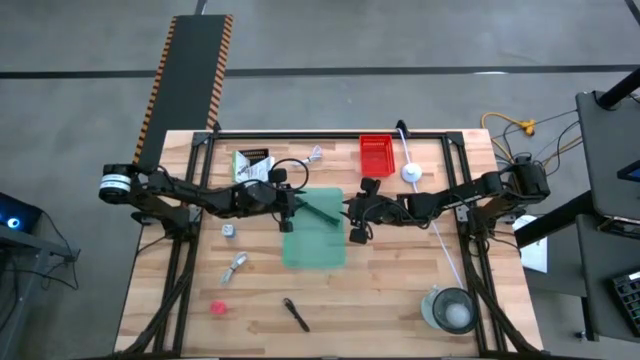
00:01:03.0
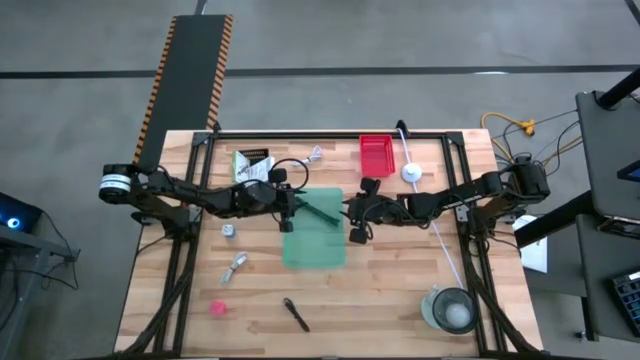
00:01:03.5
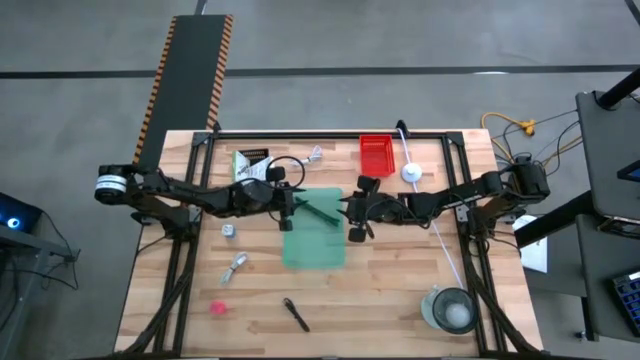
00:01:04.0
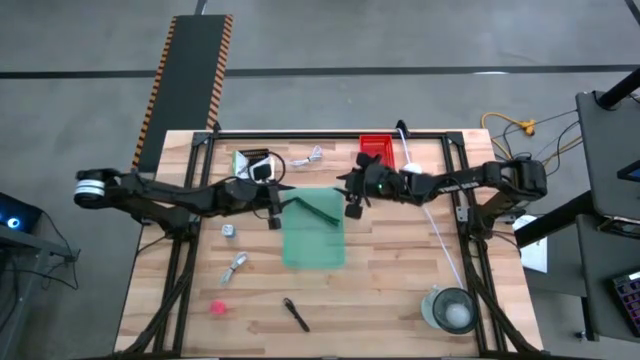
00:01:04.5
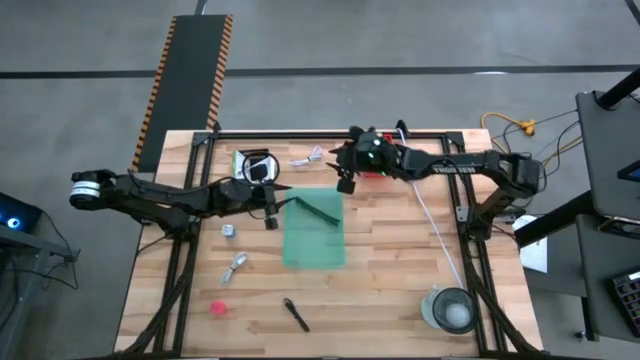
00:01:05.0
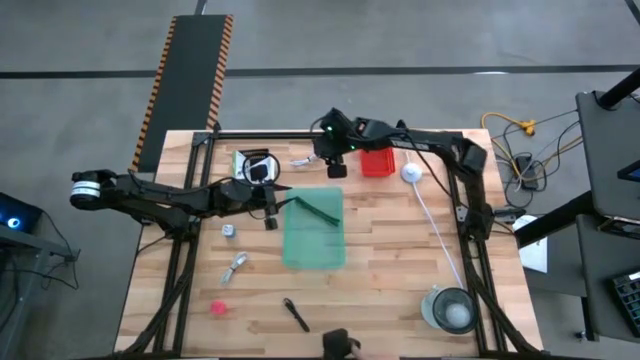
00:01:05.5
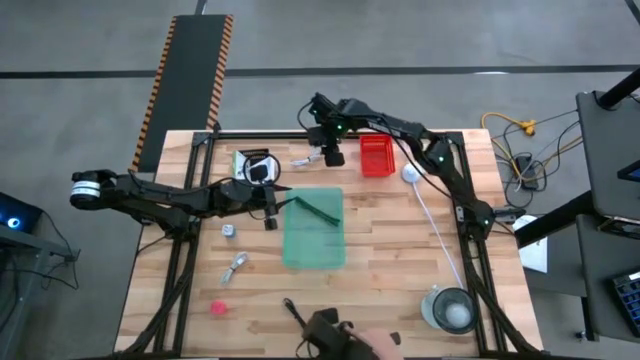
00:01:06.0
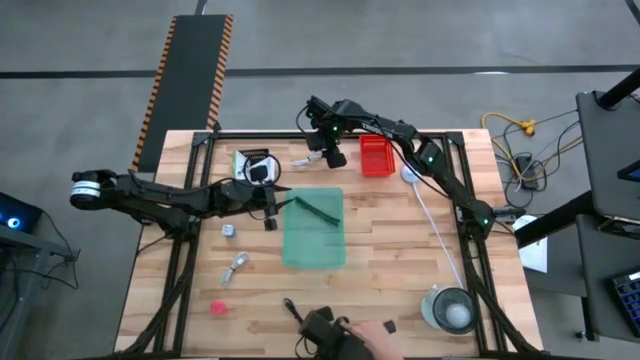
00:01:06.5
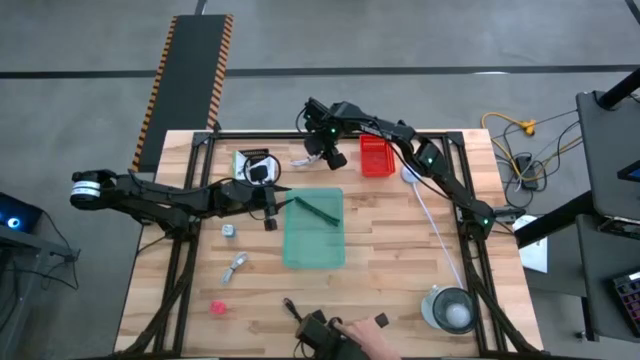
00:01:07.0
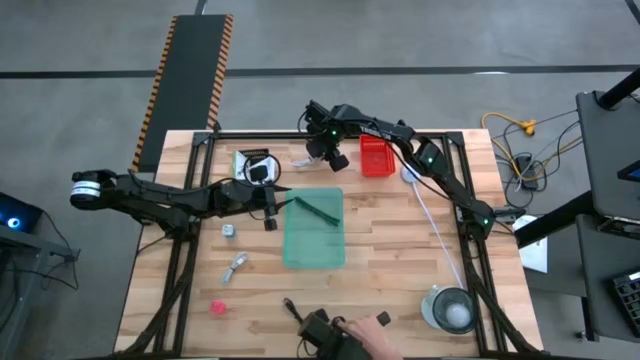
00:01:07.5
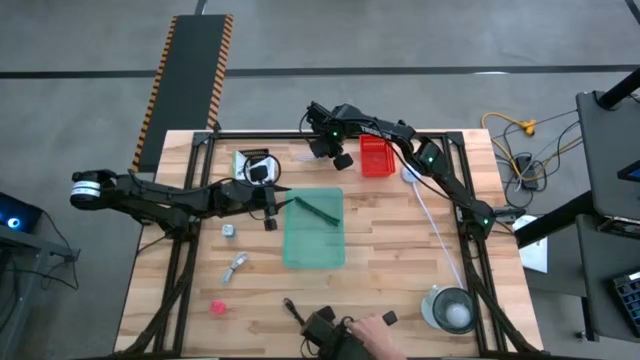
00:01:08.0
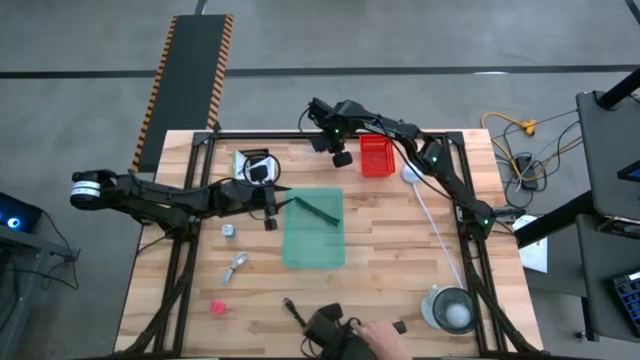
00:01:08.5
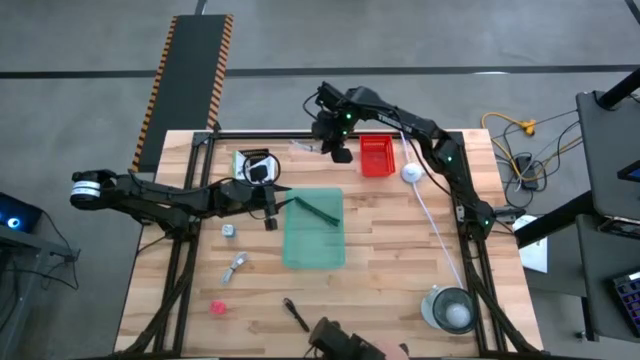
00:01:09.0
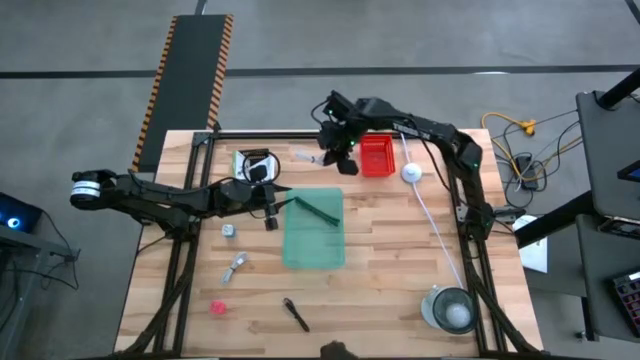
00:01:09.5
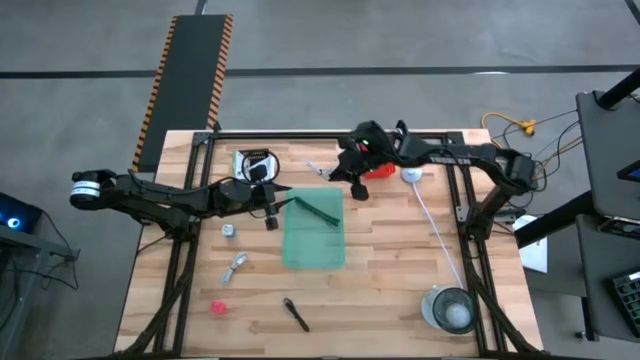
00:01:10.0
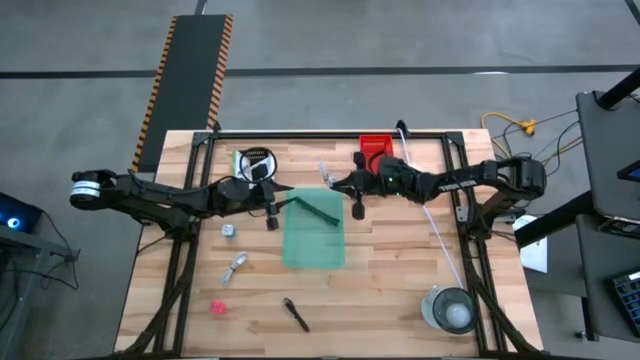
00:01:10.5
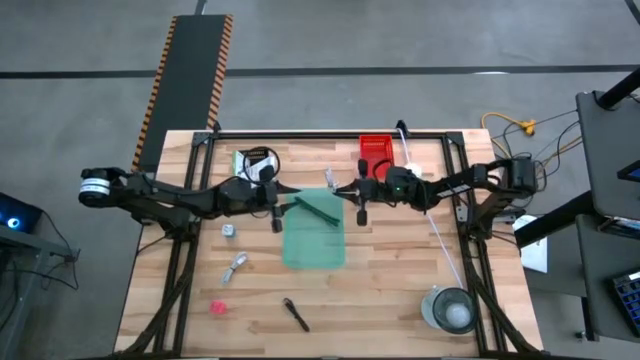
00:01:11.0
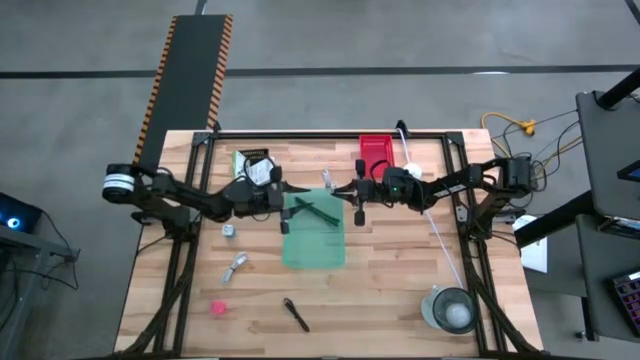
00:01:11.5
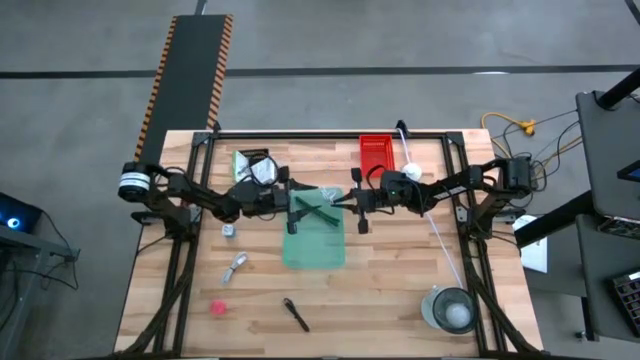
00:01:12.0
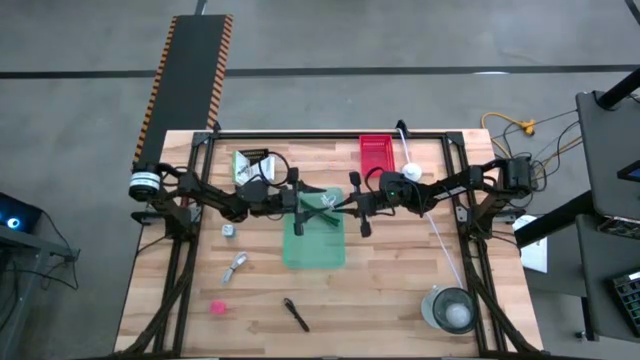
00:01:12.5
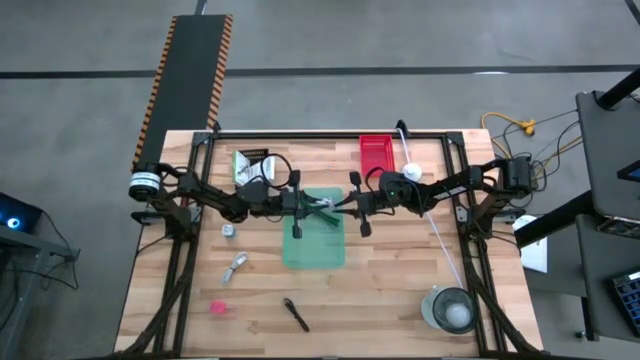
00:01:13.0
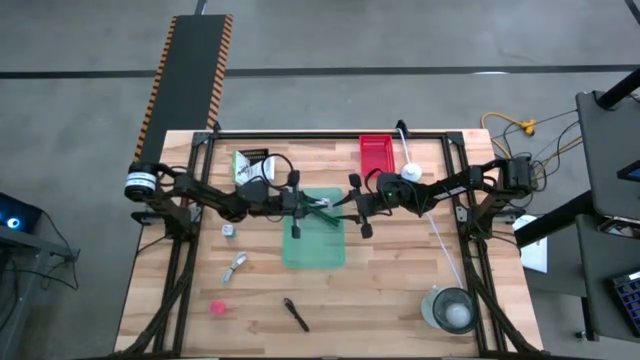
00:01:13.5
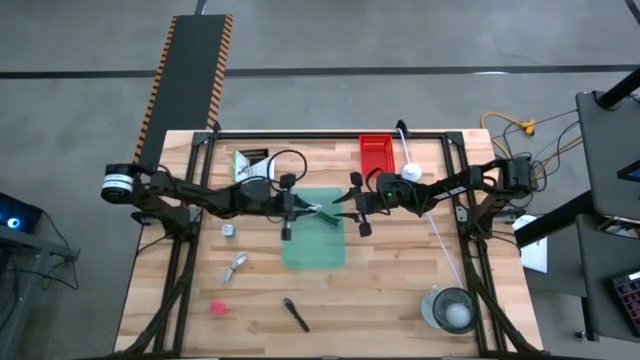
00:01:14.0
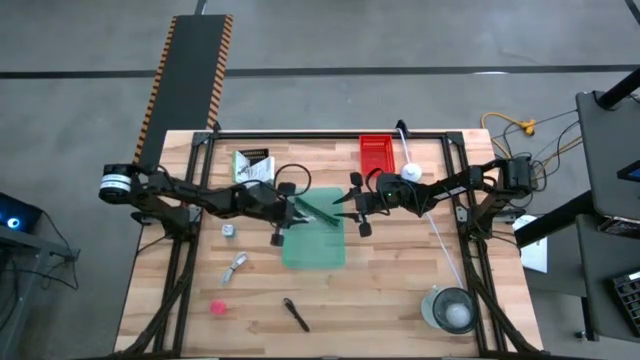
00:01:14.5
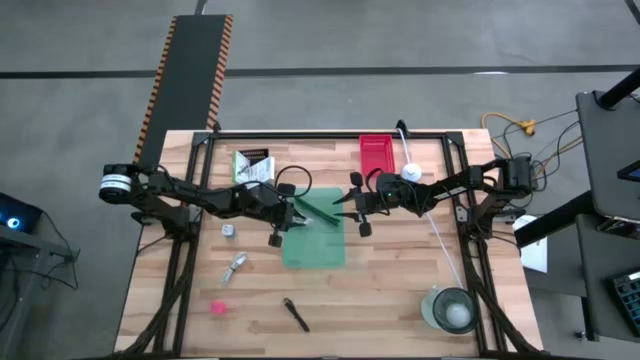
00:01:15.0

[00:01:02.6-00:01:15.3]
Task: Pick and place items into bin
Put the top white charger cable into the blue bin

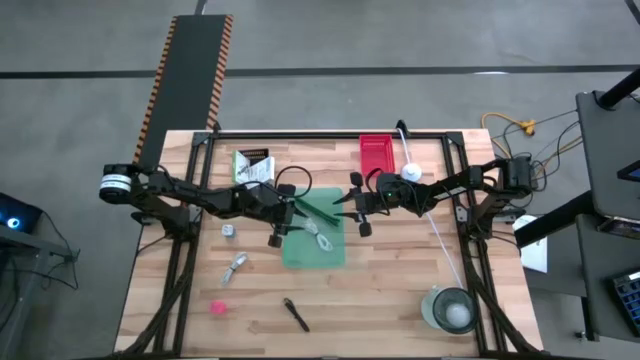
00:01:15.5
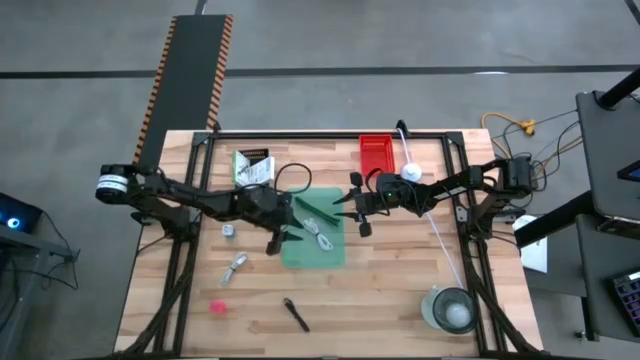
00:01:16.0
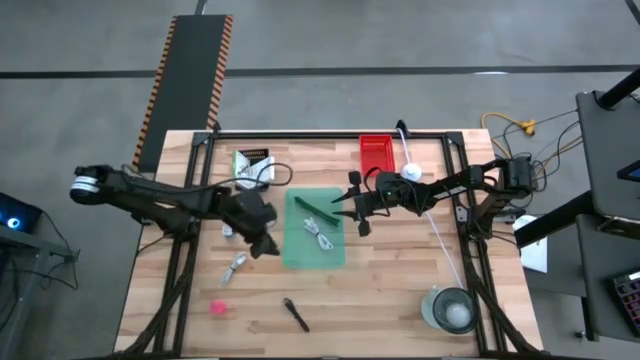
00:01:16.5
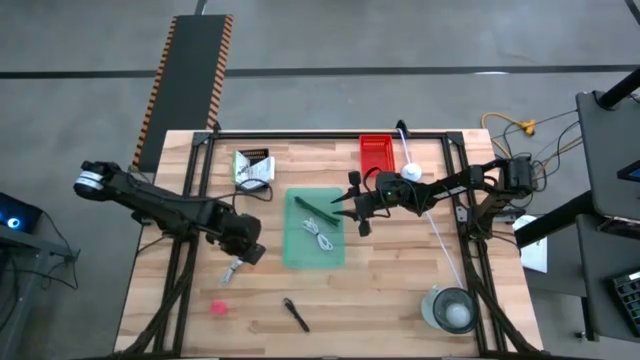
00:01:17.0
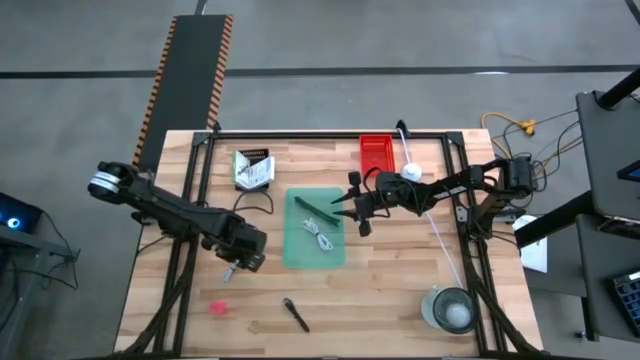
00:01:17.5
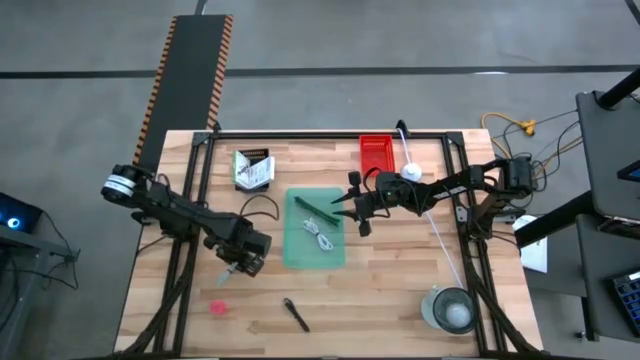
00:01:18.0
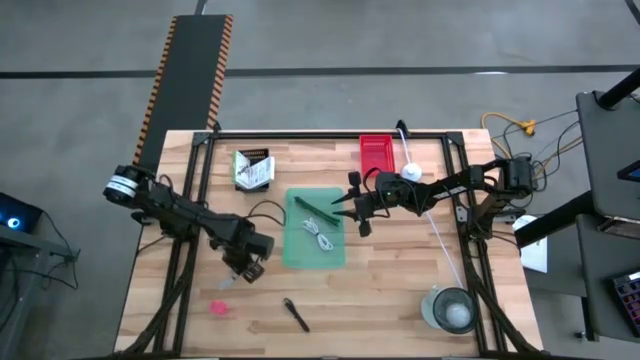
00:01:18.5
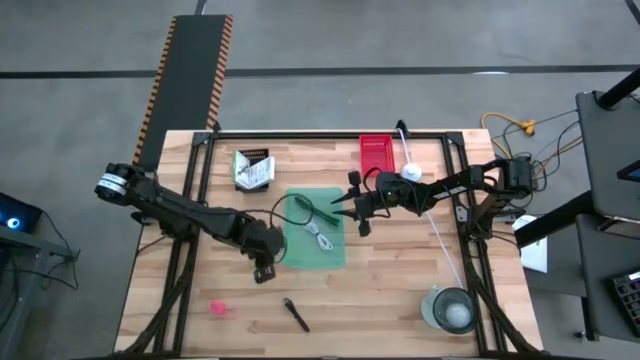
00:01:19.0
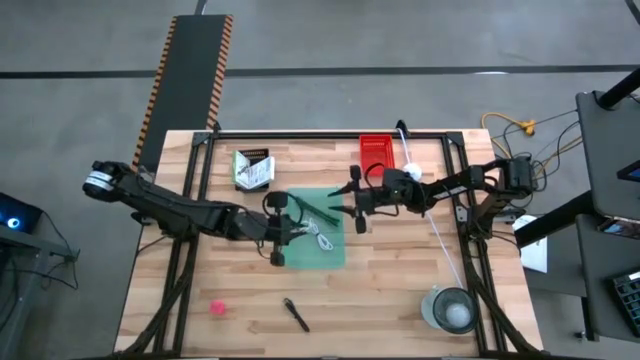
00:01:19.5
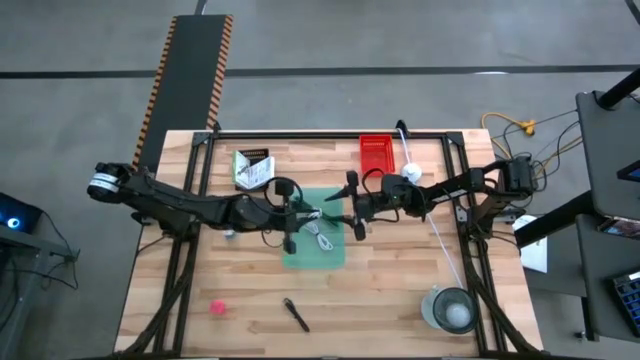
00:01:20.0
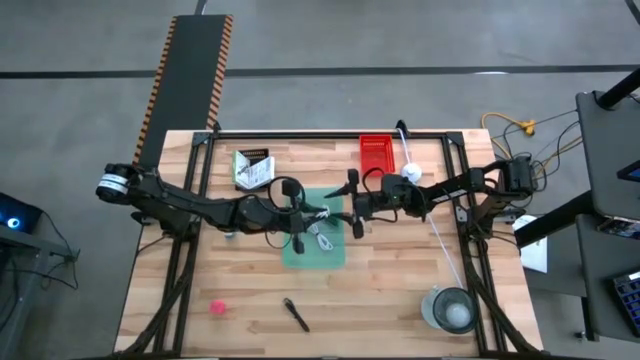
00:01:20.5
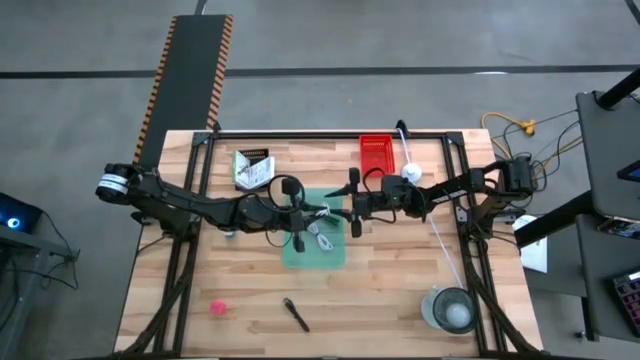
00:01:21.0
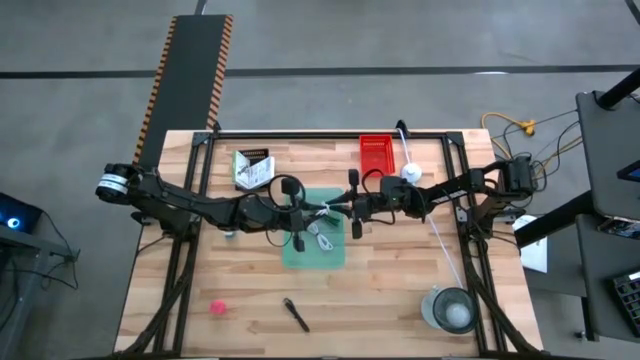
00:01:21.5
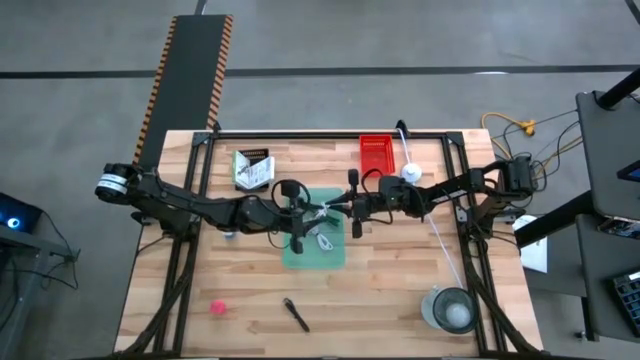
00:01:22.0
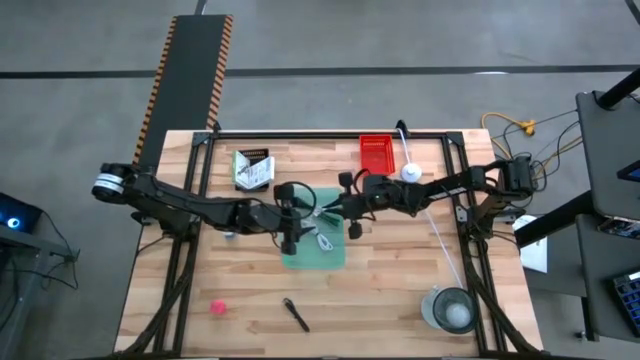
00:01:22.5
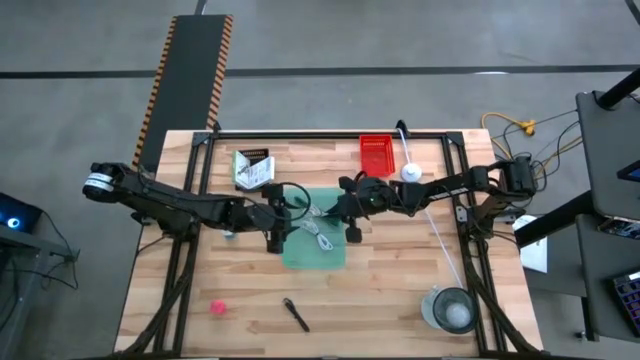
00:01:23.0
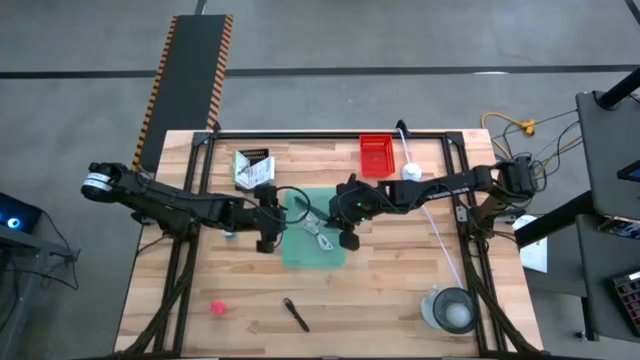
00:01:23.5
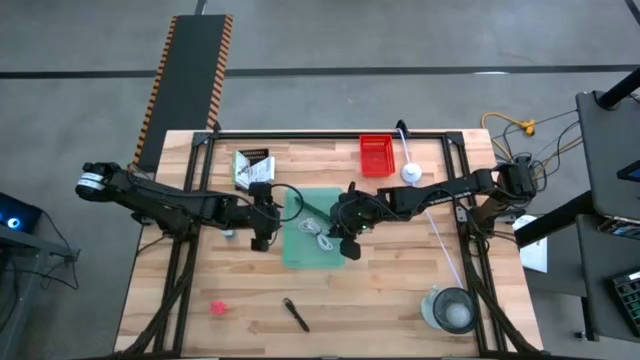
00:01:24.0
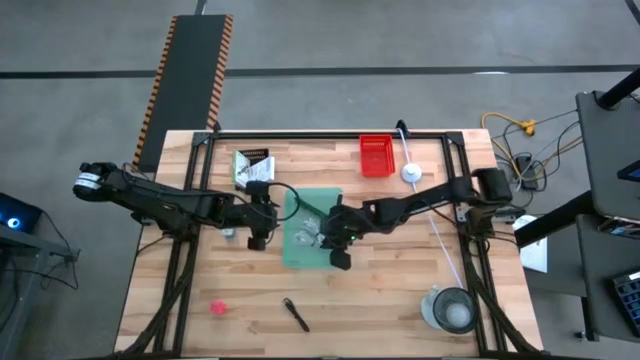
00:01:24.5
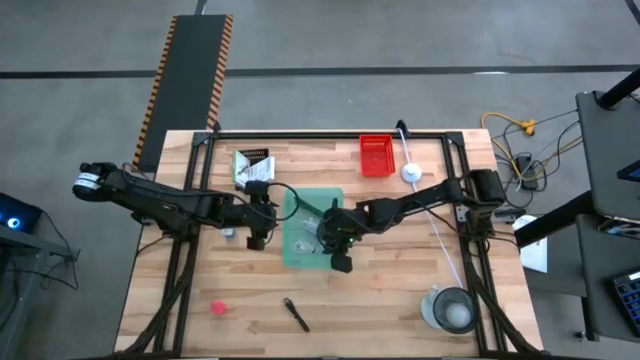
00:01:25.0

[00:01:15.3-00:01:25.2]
Put the white charger cable into the blue bin
